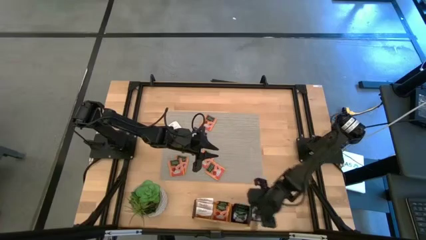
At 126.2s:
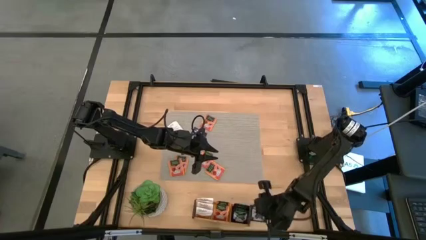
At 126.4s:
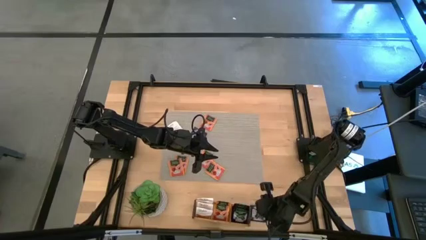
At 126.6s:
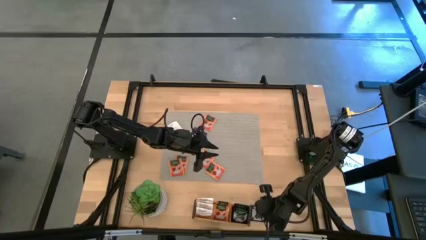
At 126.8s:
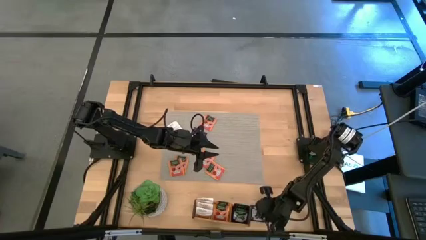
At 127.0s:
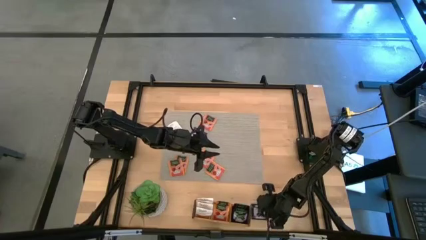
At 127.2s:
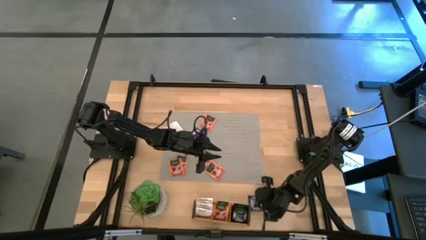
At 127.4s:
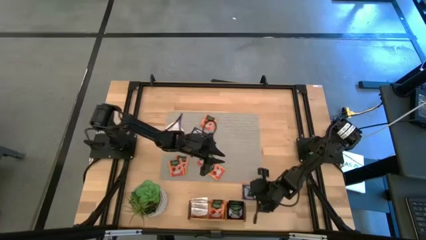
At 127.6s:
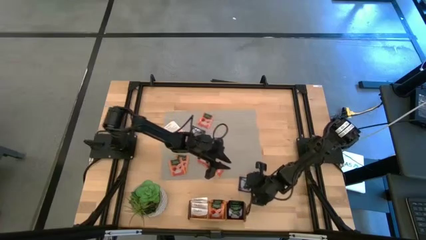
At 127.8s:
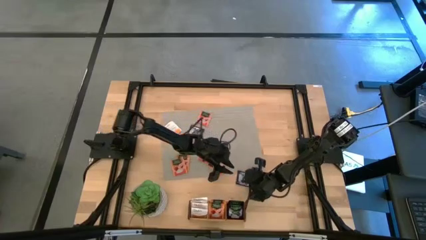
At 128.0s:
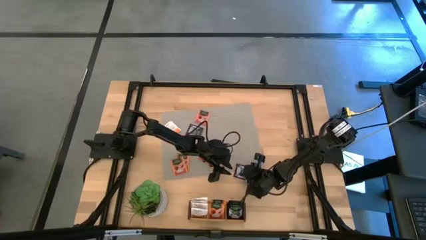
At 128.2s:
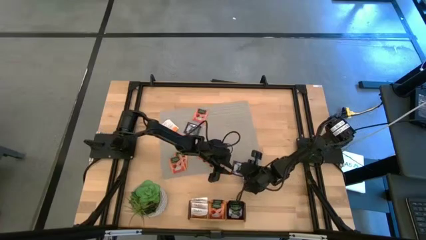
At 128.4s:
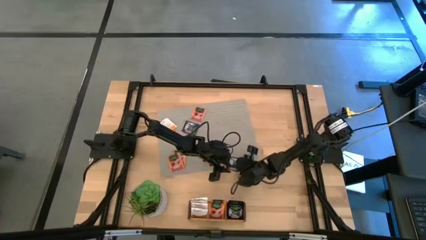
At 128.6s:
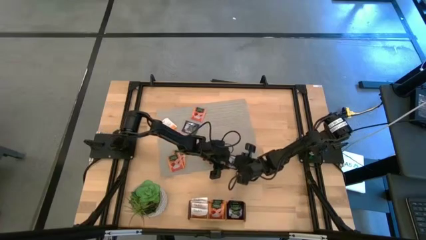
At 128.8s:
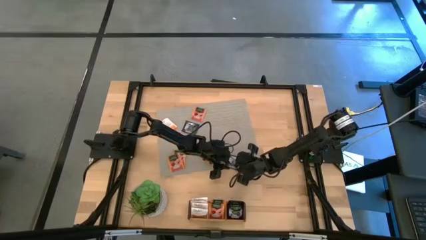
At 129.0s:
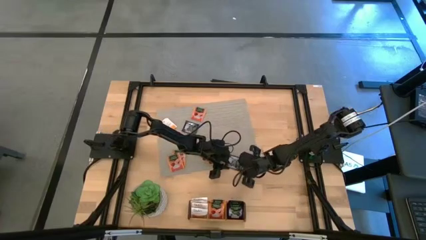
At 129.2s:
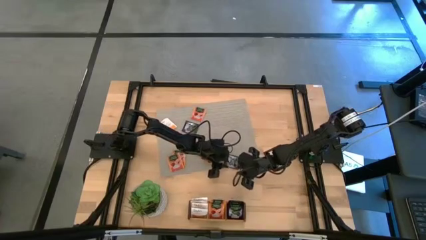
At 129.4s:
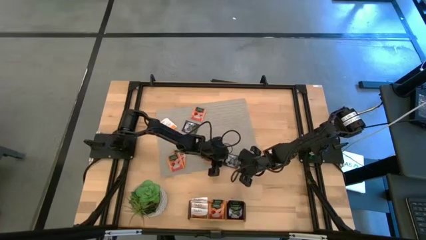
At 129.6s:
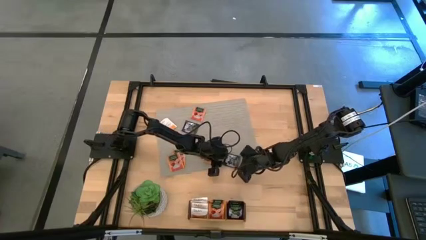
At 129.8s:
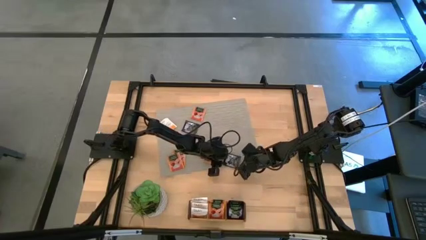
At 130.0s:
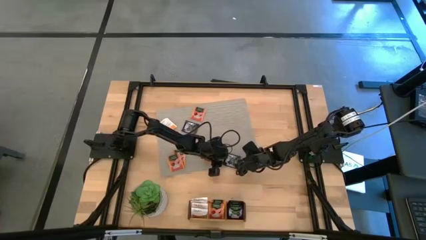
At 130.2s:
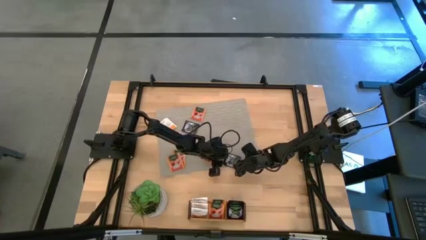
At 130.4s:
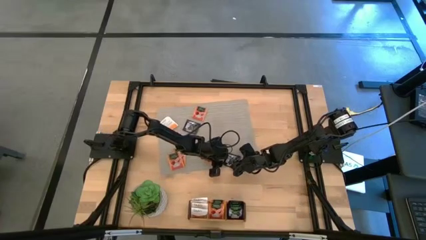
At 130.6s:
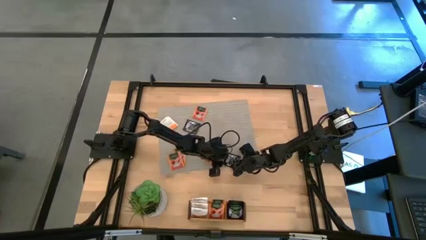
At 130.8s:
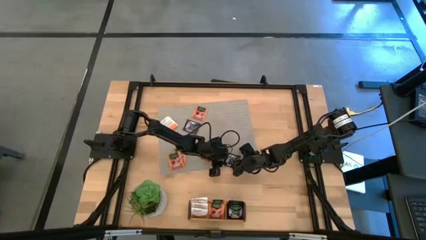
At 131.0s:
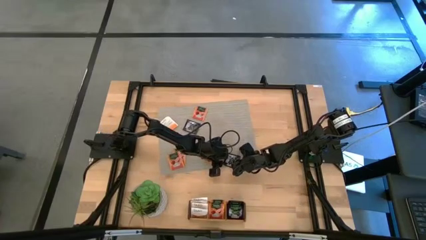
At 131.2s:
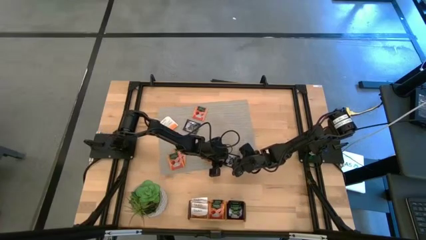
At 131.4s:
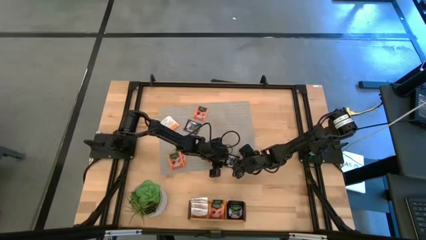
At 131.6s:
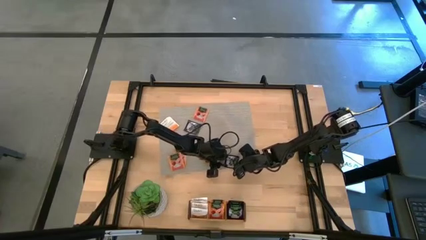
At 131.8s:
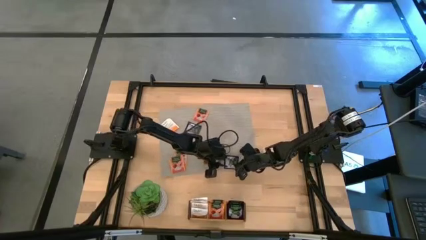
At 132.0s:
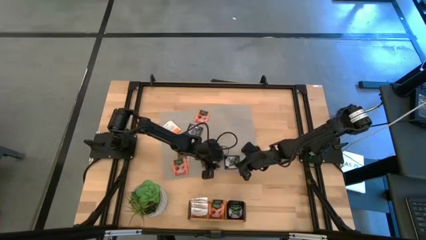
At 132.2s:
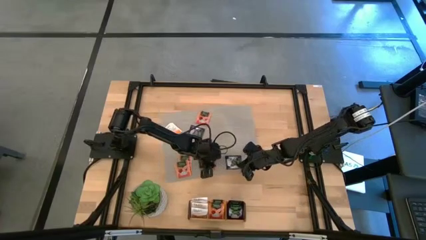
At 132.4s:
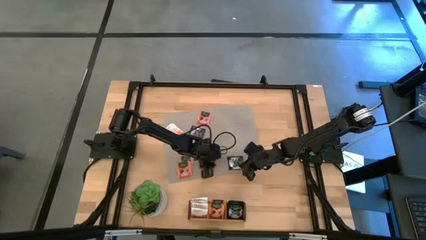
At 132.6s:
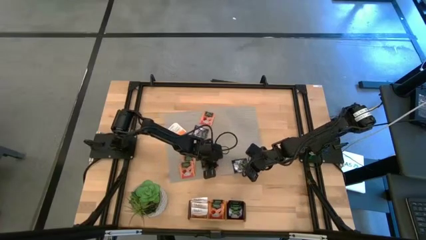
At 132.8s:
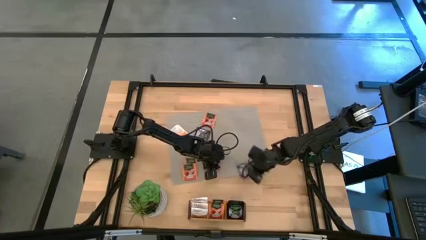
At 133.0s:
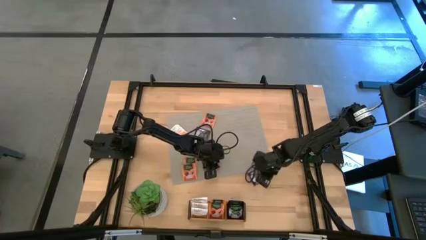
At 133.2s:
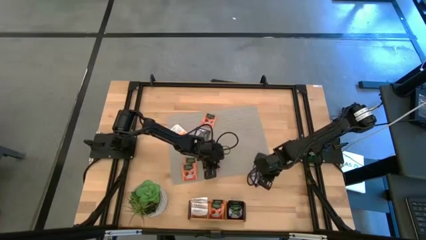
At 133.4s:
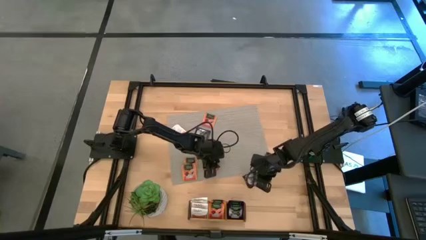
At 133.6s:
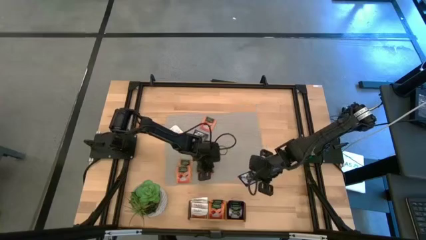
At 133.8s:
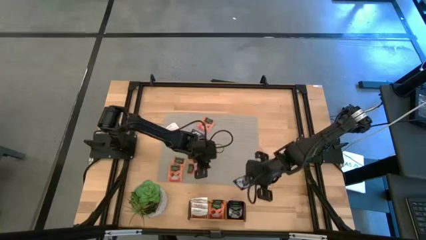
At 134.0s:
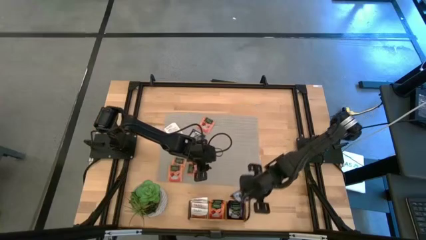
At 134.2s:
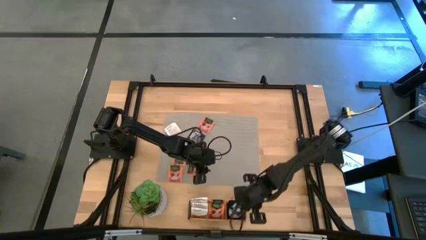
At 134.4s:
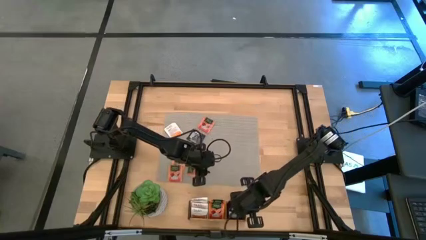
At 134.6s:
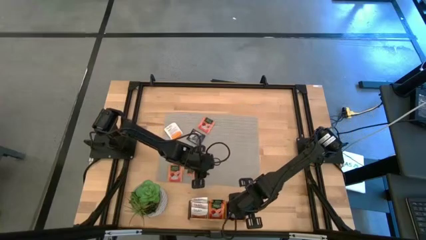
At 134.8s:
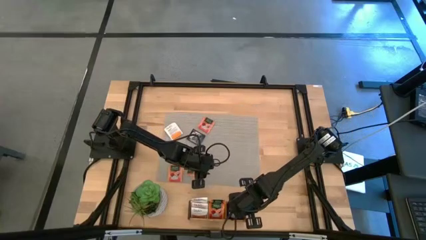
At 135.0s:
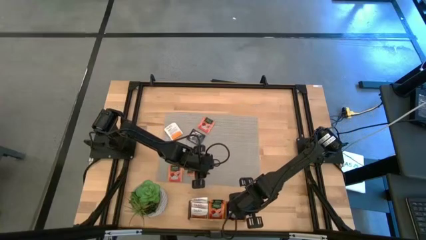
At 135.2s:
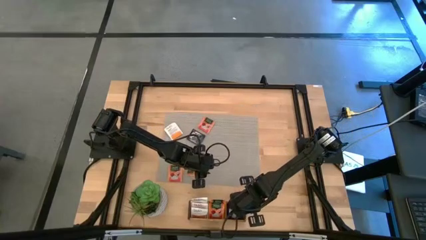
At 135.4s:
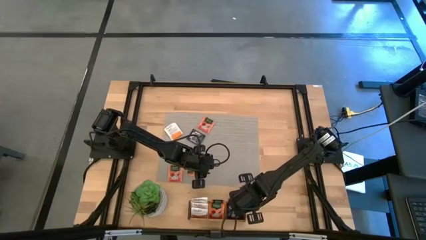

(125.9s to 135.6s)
Task: Pick & Place Tea
Put the black tea bag into the right section of the wooden organizer

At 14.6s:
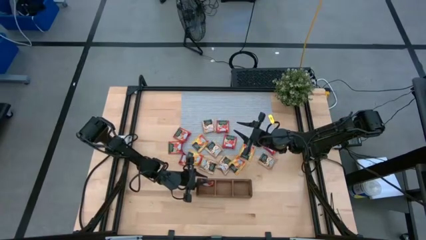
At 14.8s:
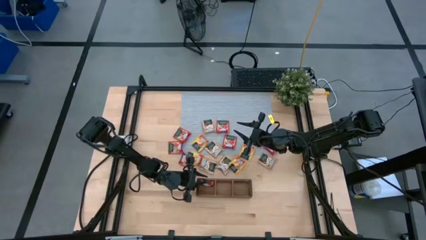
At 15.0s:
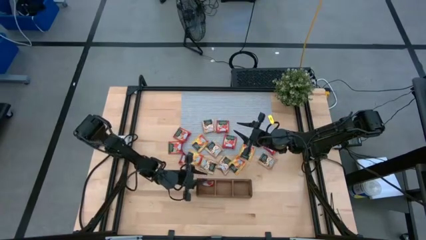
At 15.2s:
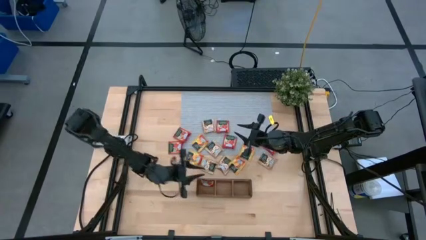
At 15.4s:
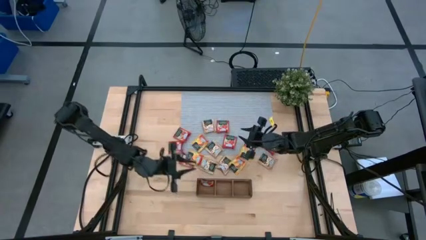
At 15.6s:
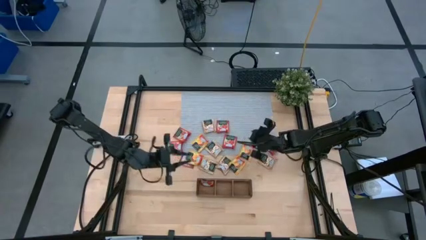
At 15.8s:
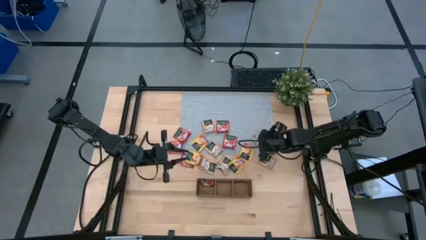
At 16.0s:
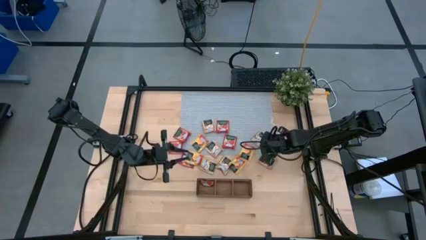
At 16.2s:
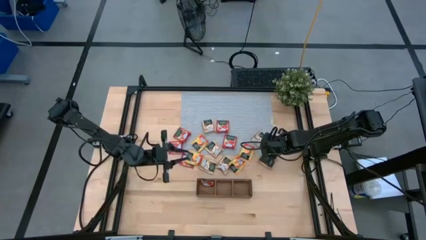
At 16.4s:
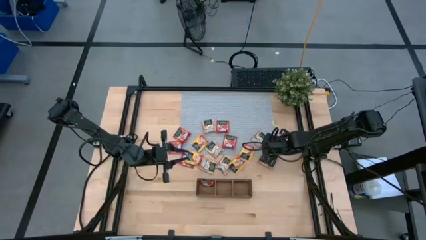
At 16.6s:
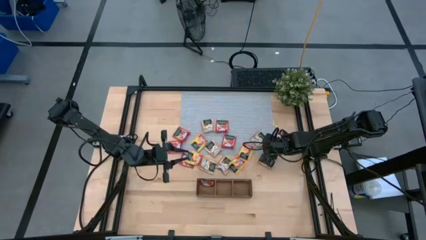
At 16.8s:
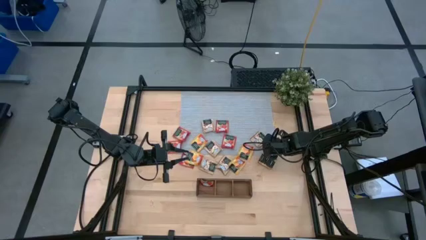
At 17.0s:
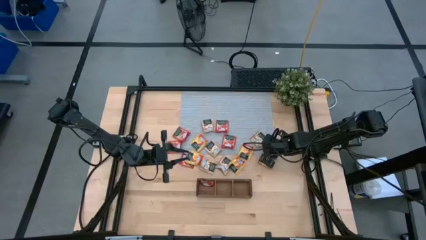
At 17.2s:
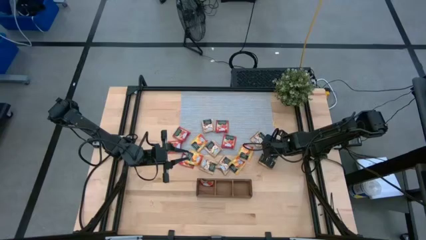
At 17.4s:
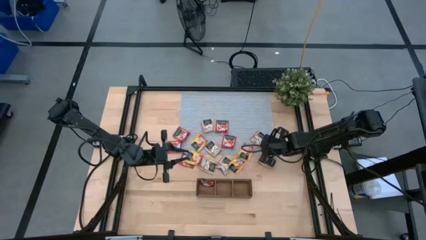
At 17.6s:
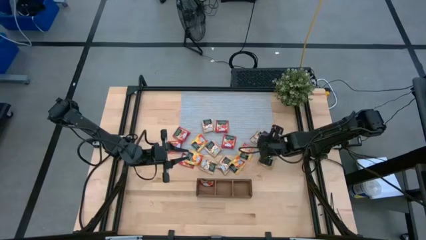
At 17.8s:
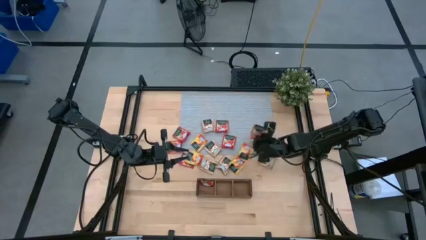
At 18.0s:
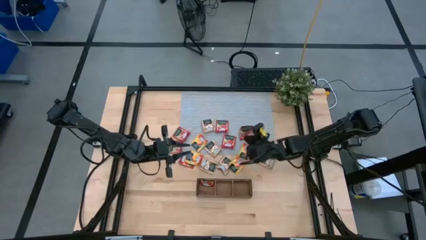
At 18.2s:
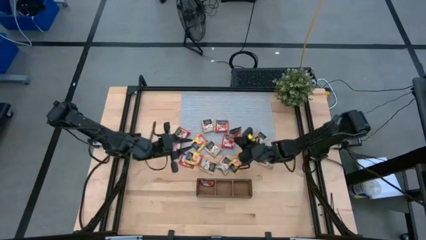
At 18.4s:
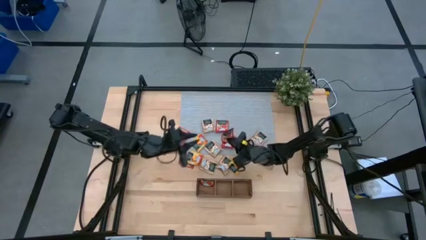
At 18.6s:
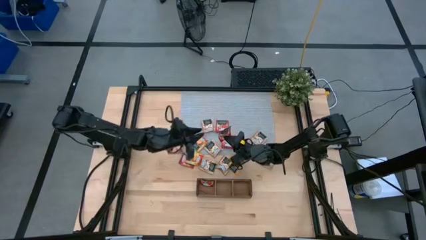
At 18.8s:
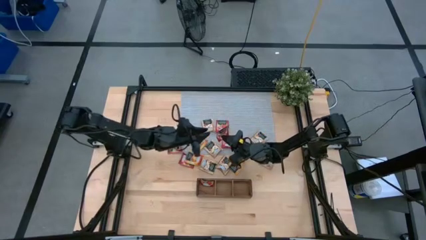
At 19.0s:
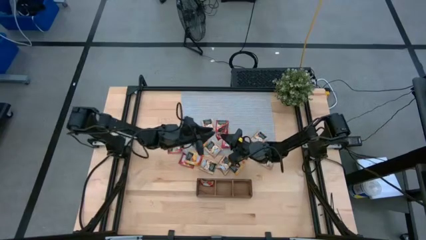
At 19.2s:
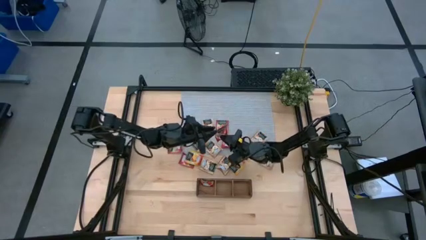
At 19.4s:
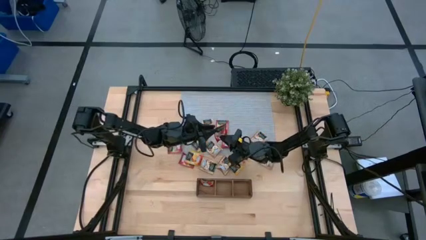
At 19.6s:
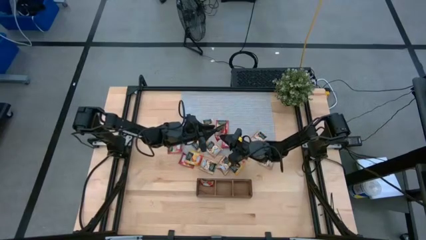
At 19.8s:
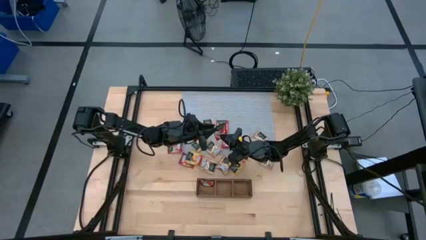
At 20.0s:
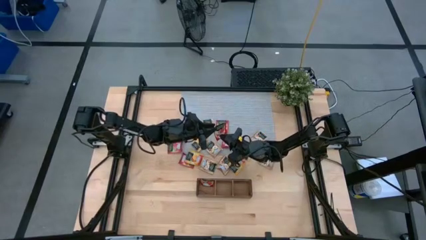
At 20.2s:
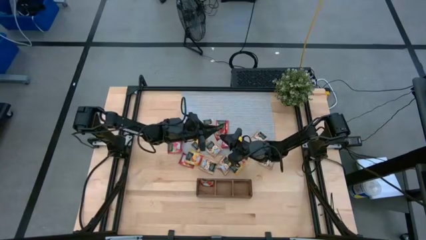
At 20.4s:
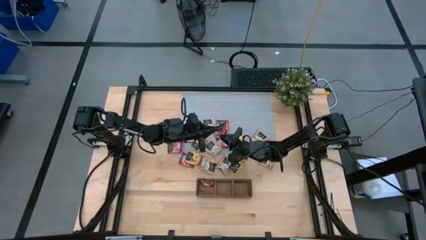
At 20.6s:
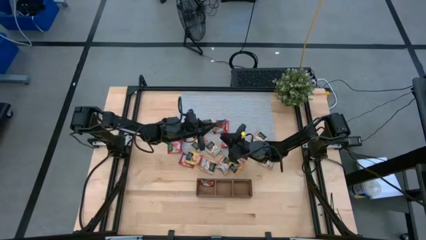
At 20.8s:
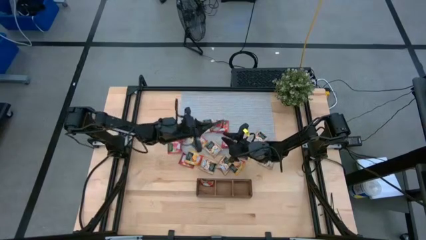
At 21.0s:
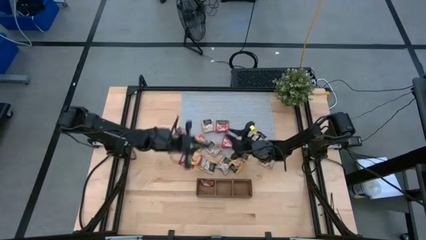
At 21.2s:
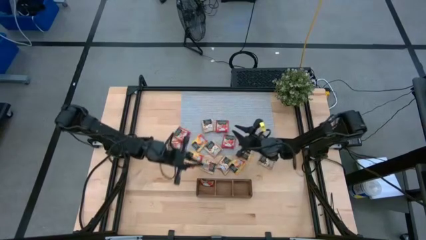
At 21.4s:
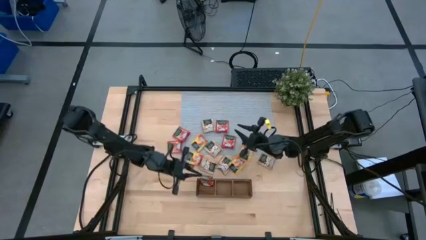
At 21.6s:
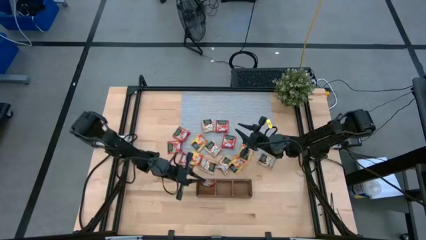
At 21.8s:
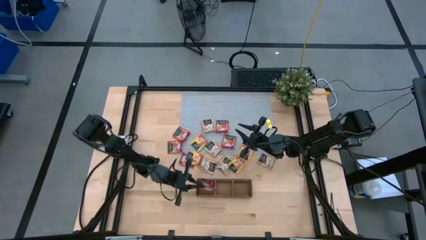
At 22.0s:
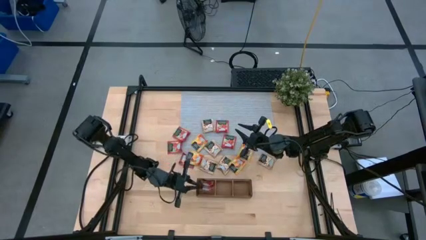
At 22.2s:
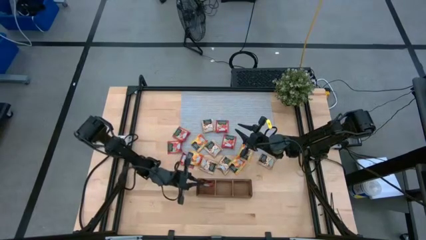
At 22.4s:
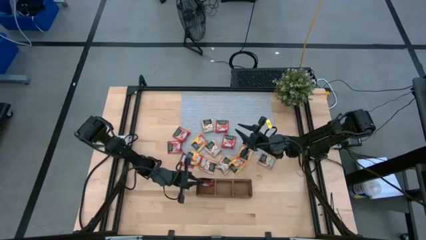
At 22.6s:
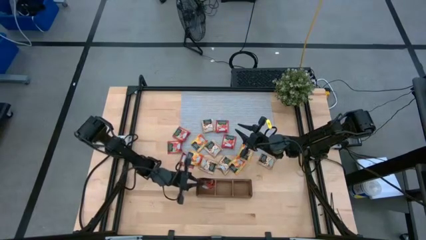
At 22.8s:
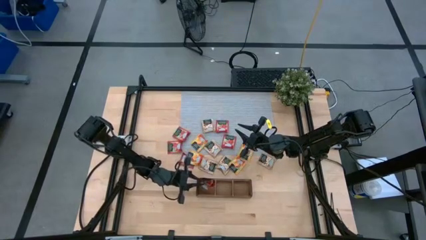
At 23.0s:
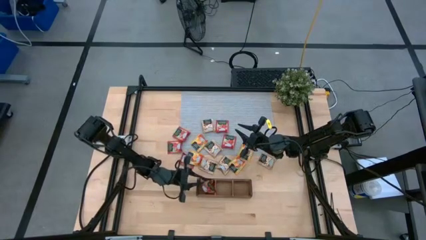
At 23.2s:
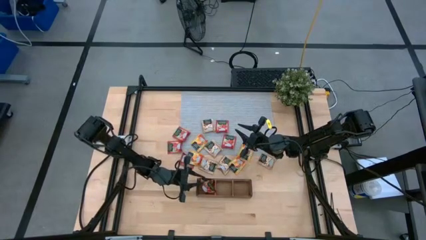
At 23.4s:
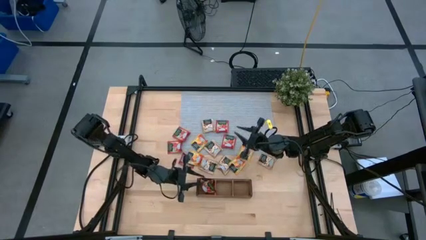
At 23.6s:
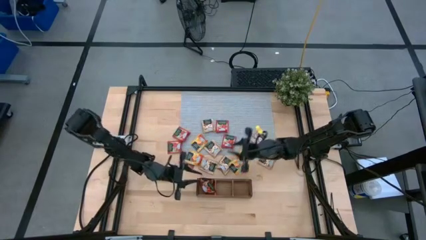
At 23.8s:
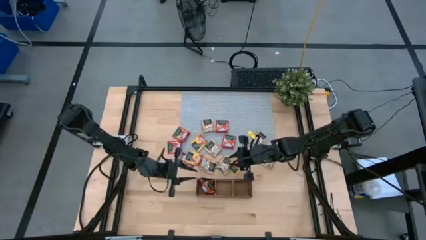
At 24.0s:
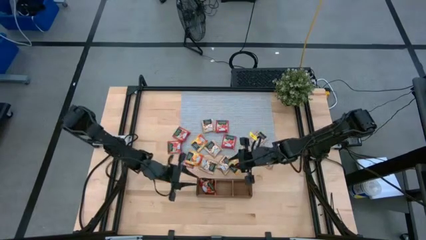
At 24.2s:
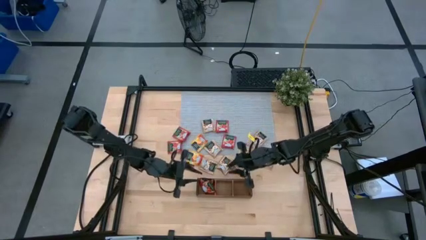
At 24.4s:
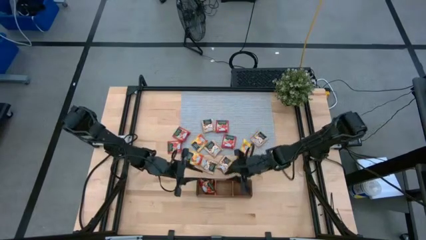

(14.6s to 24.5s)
Task: Pick & Place Tea
Put the red tea bag into the left section of the wooden organizer
